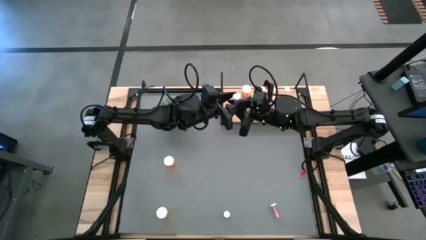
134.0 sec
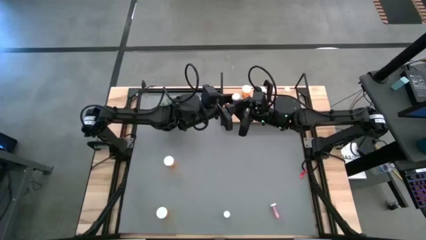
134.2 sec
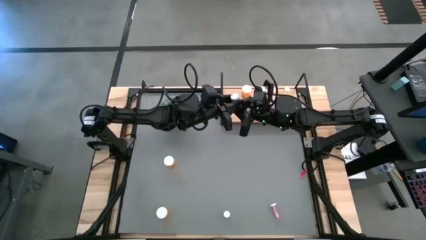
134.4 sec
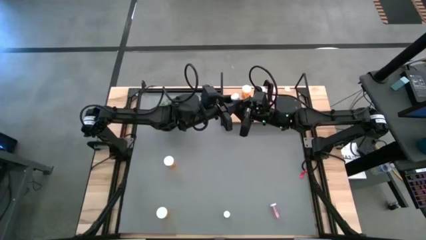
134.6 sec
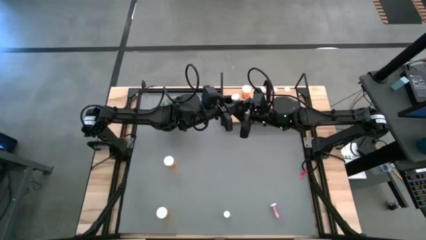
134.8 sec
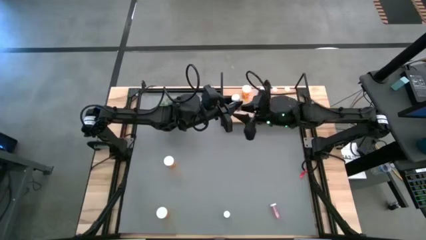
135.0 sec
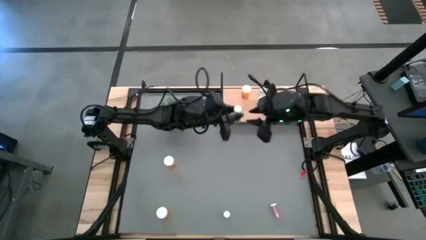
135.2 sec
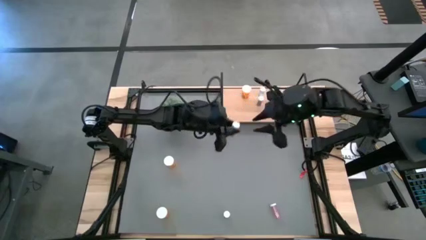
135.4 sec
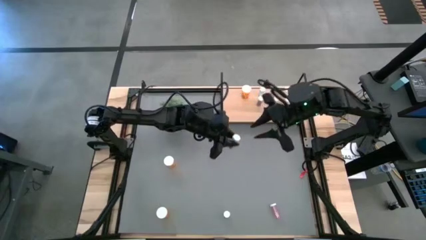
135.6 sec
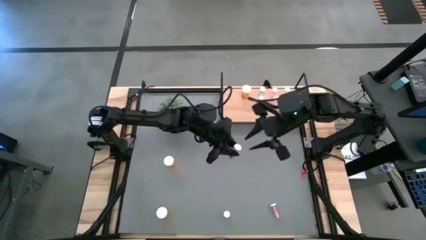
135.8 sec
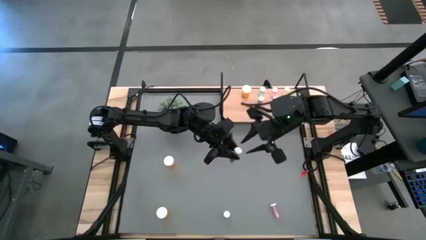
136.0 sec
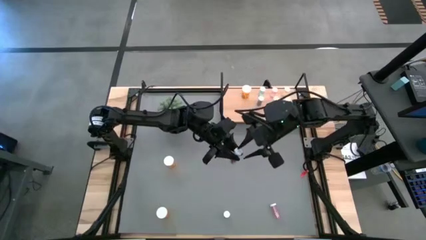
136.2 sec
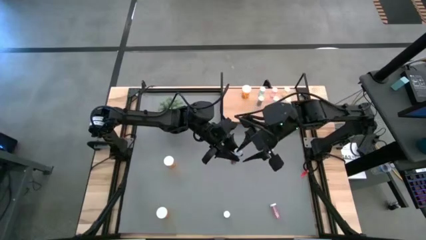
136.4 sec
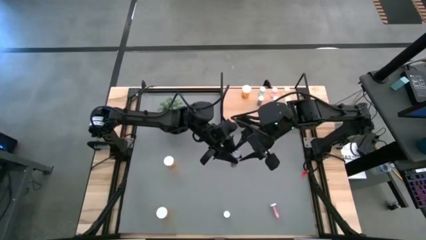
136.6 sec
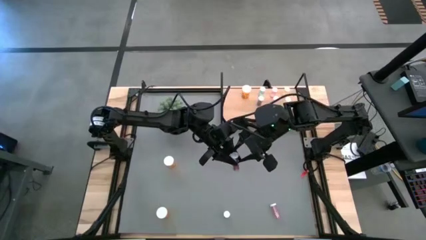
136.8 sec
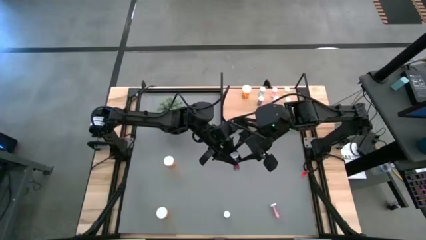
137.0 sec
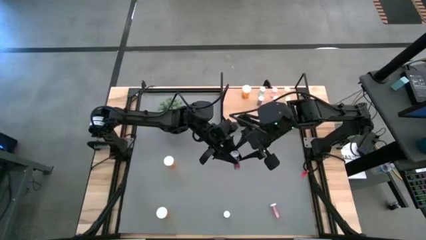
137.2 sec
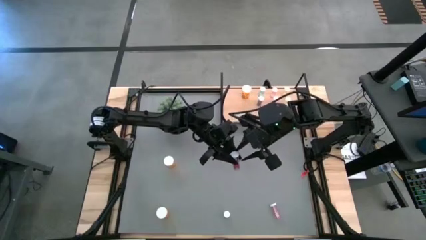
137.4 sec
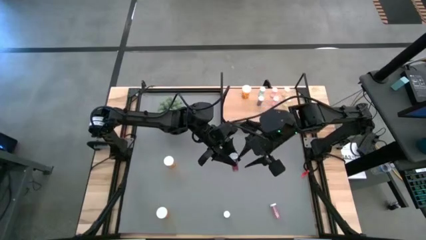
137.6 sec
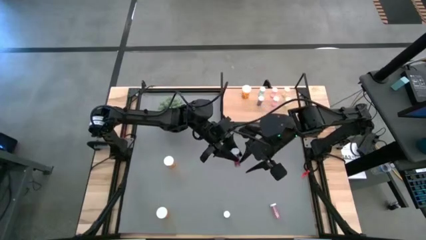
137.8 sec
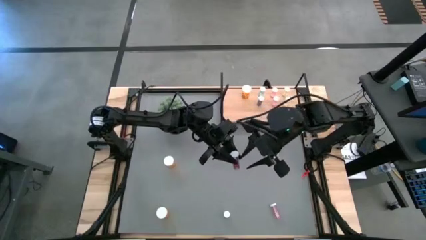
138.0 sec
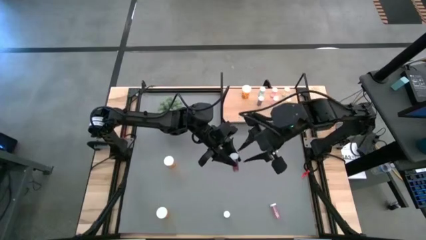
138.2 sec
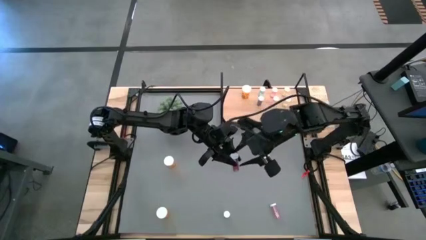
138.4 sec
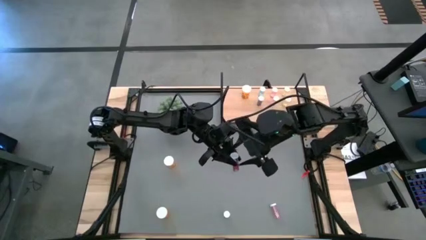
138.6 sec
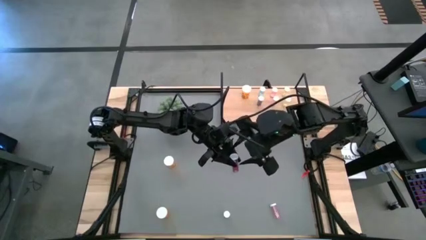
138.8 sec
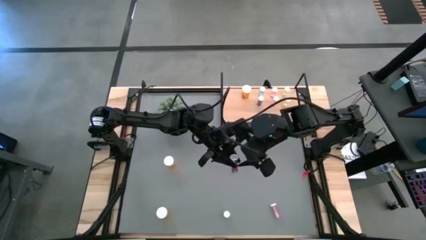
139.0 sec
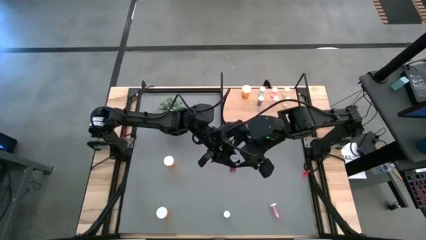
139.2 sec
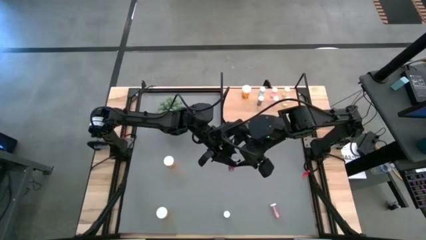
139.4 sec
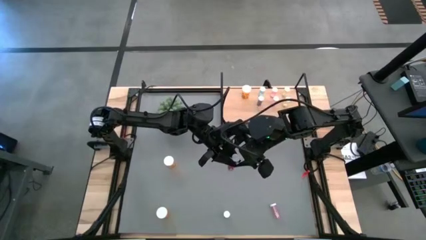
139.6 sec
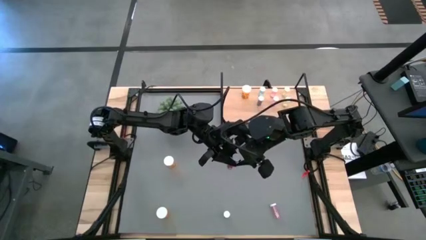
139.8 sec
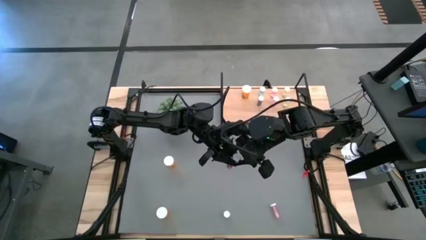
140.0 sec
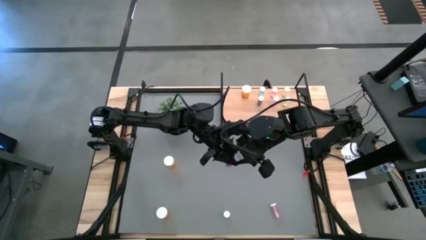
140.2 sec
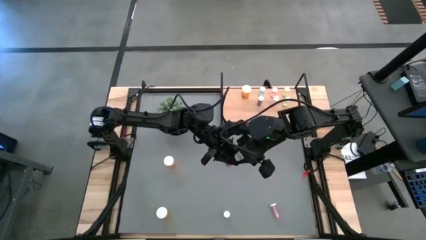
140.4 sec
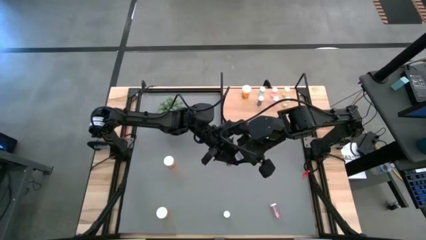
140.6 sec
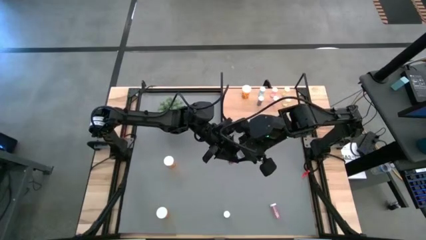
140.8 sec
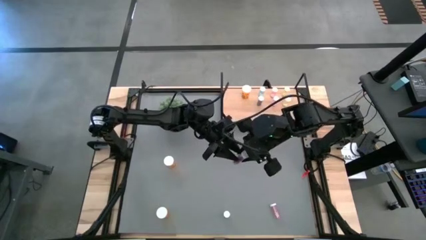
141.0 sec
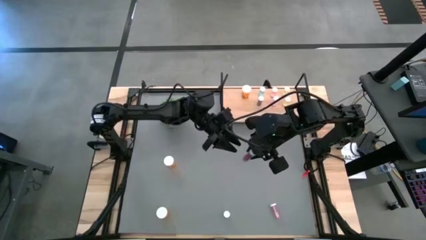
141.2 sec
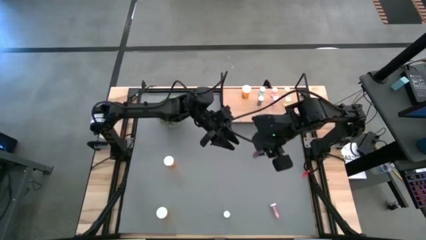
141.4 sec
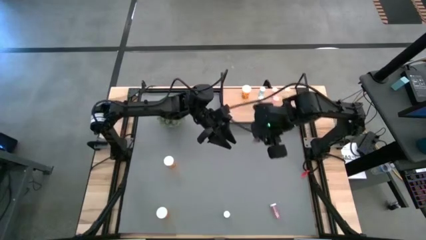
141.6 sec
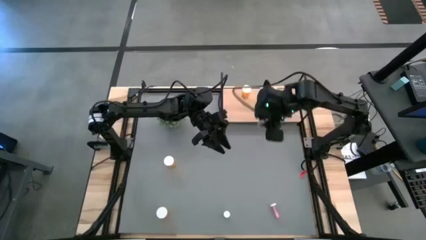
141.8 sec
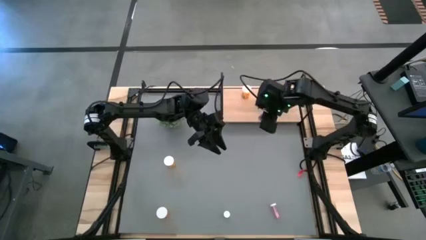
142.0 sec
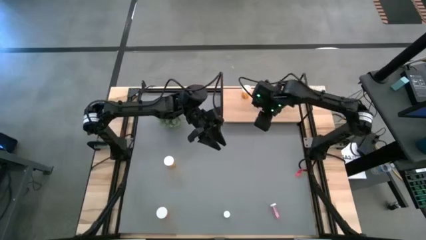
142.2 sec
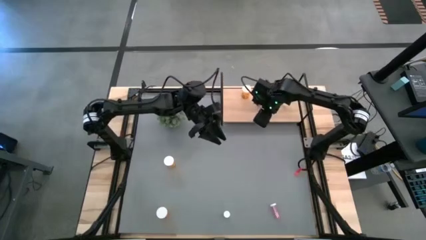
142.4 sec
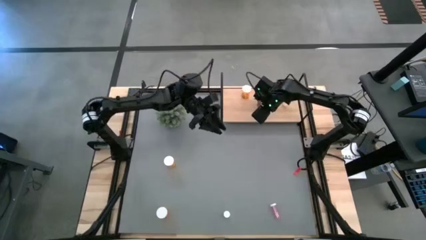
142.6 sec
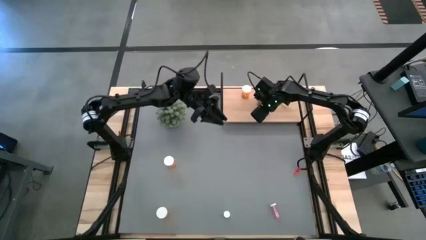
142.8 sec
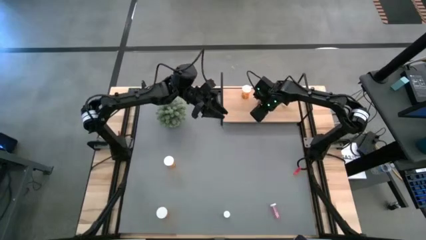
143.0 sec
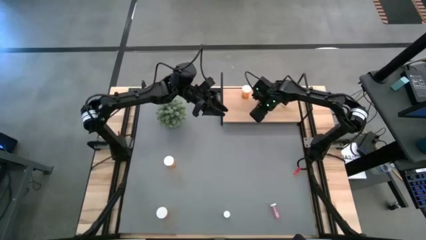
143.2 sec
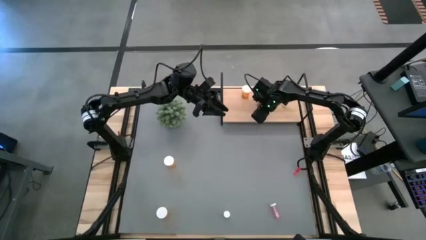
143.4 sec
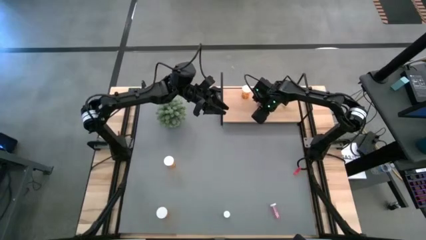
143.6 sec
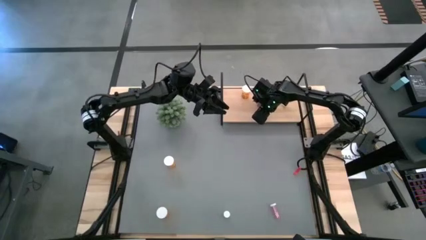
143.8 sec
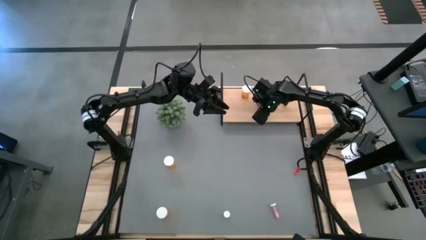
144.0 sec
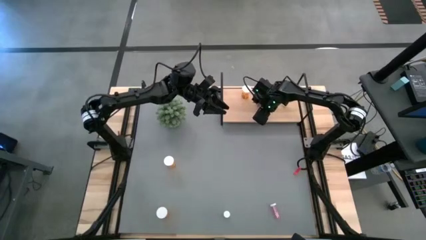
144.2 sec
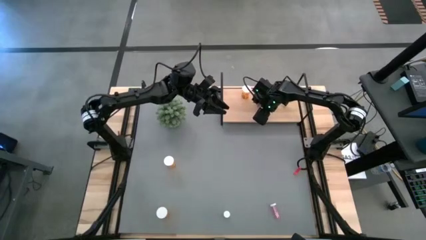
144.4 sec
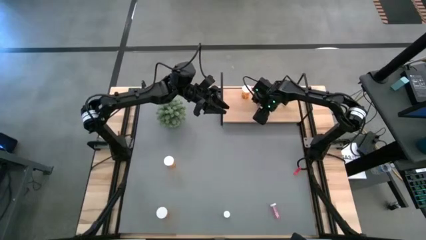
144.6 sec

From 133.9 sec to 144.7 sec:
Task: Pick and place medicine bottles onto shelf by color
Put the blue pill bottle on the shelf aligned with the other blue pill bottles
